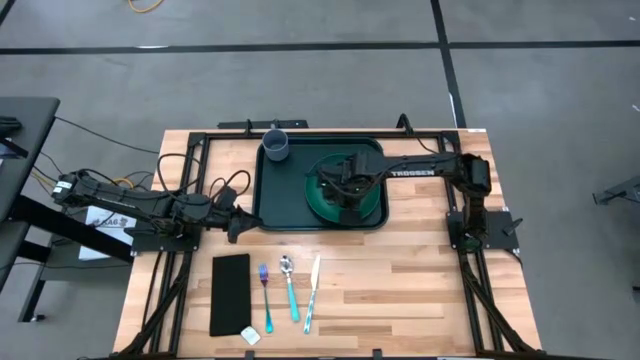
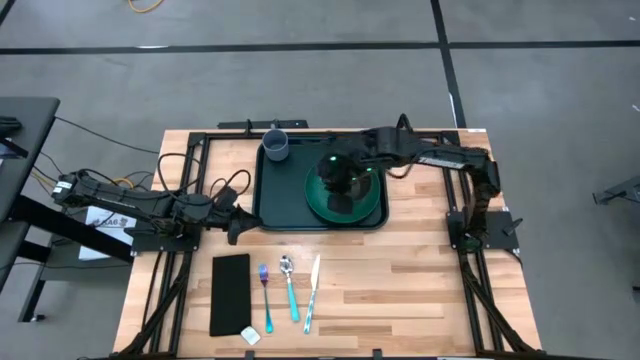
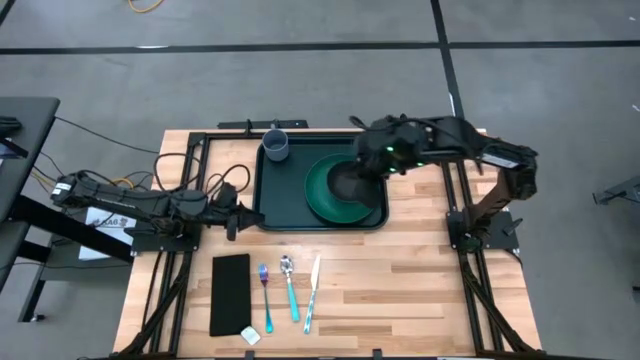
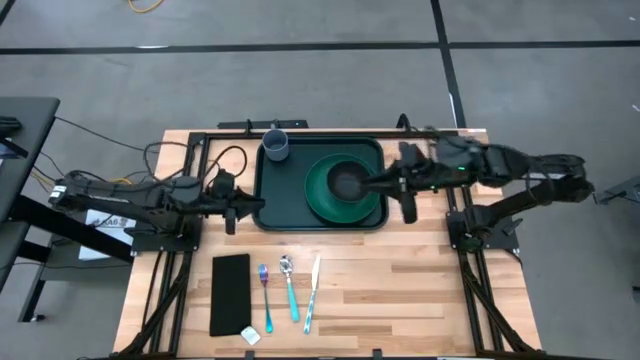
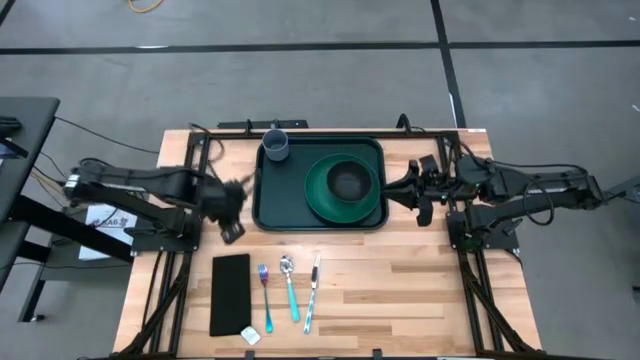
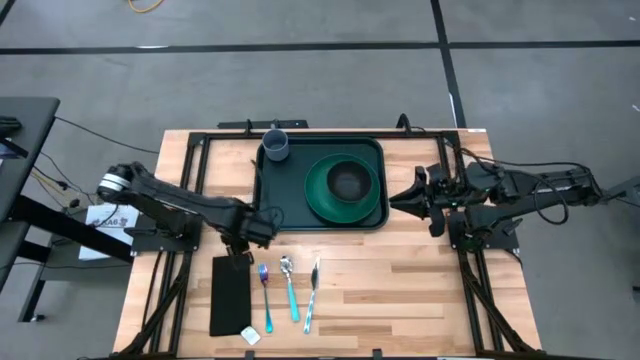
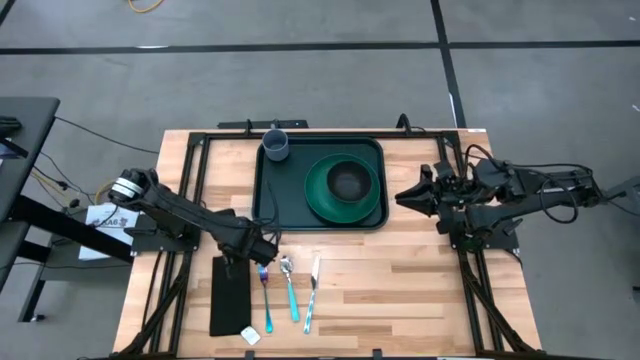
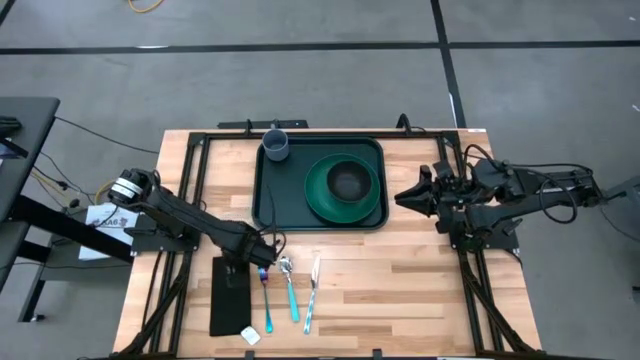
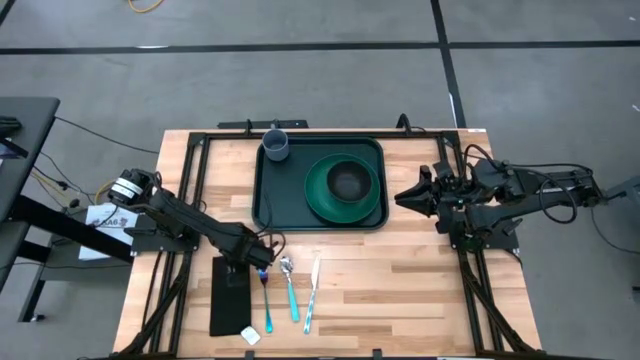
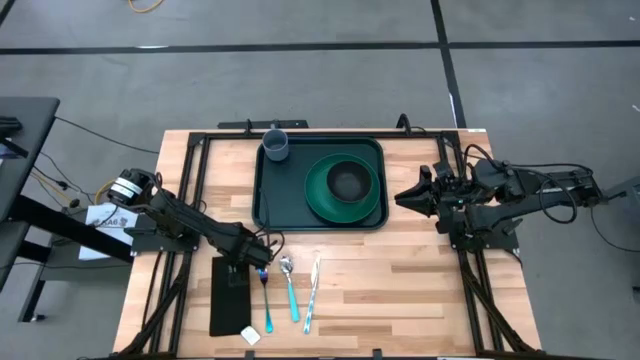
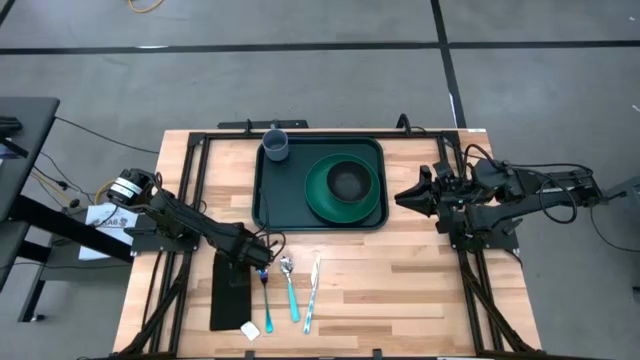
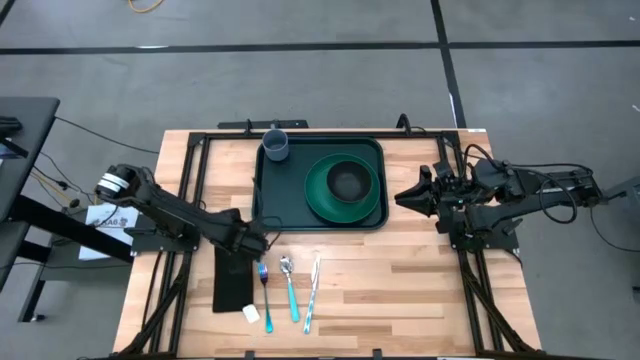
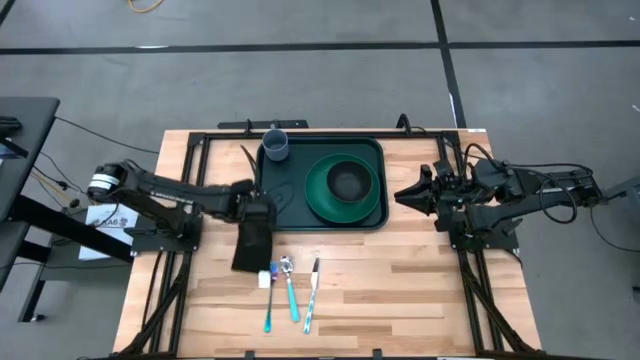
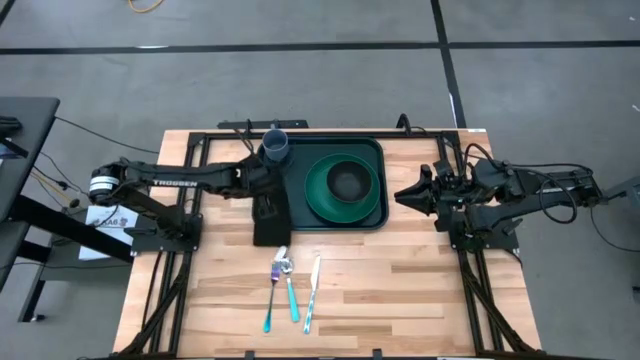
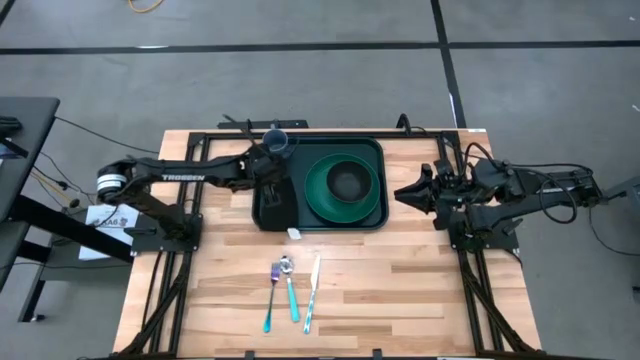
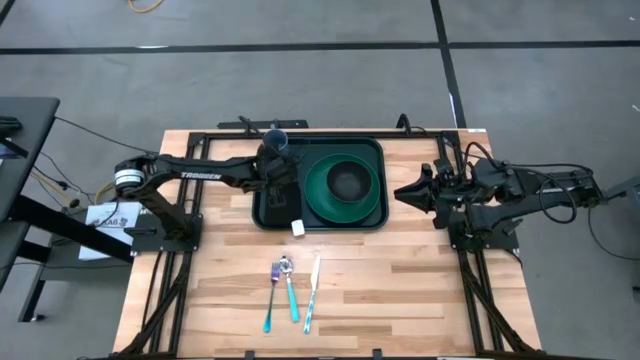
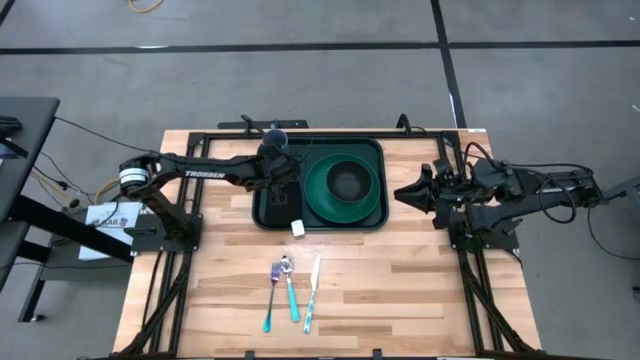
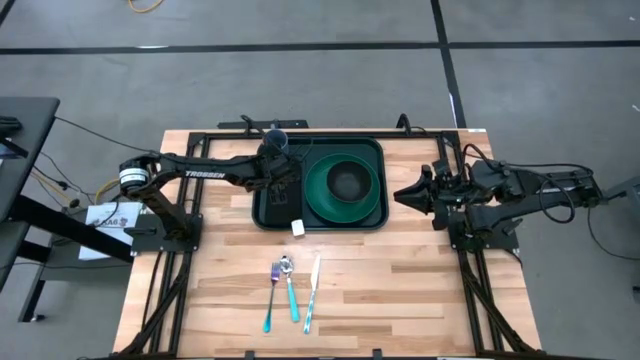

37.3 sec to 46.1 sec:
Task: Set up tray
Put the black napkin to the left of the green plate on the dark green tray

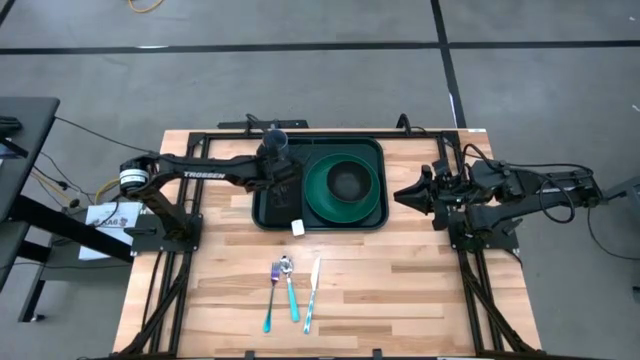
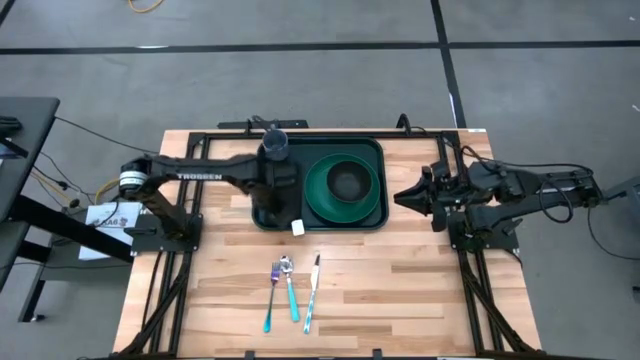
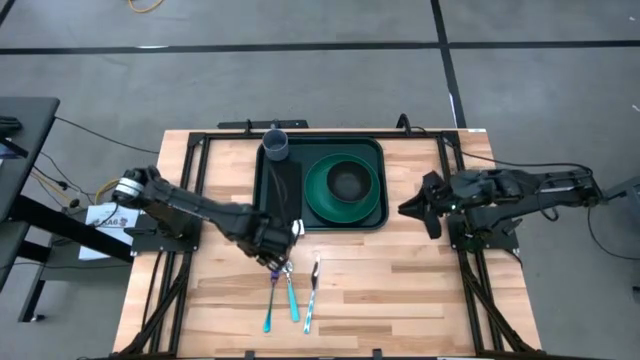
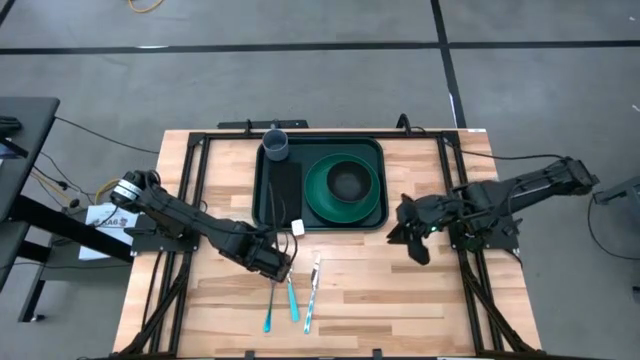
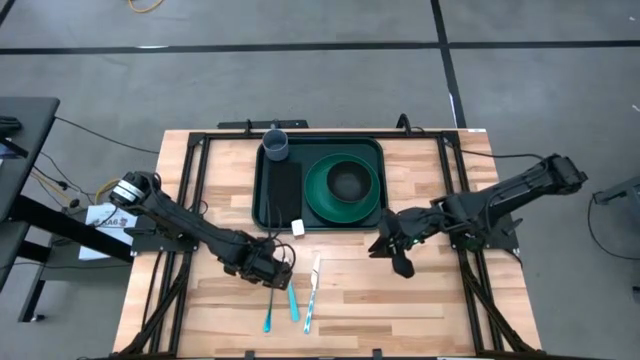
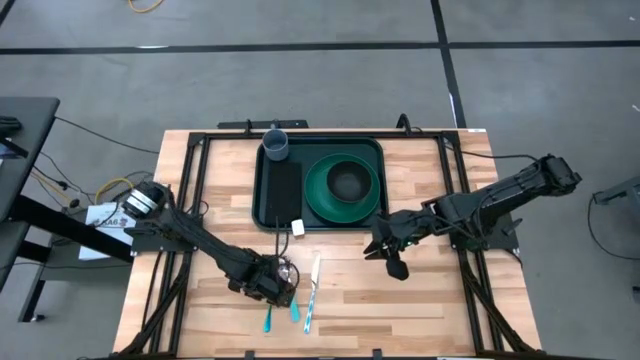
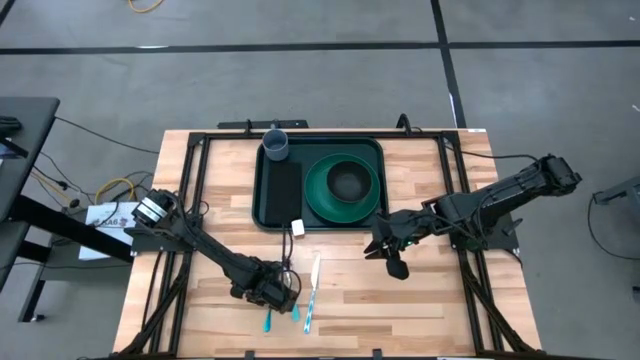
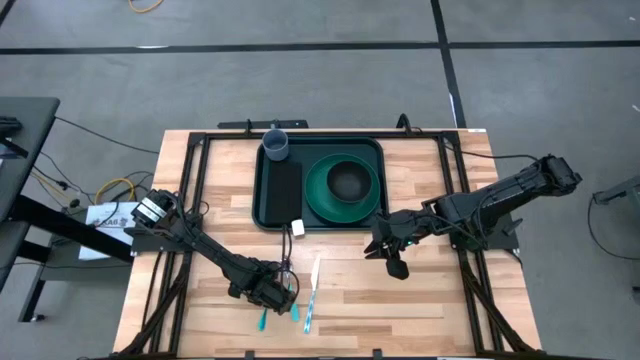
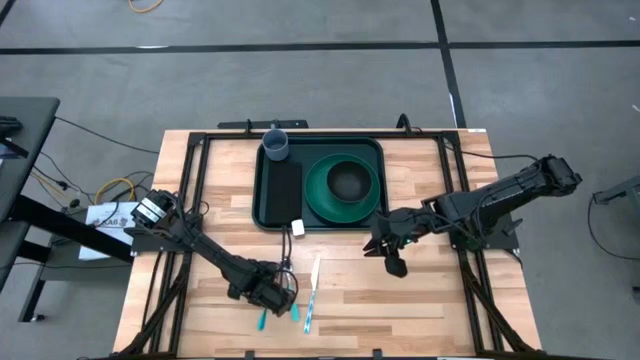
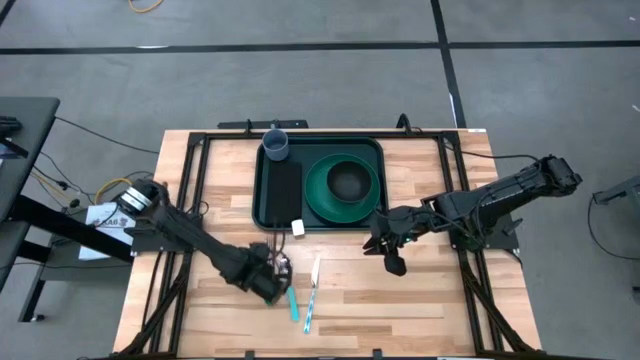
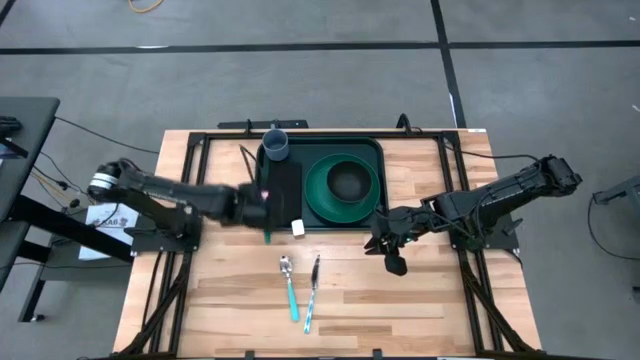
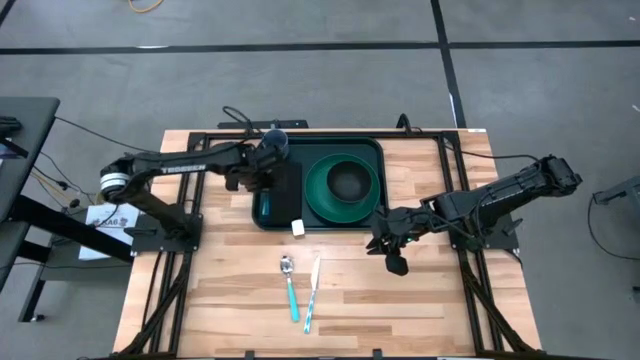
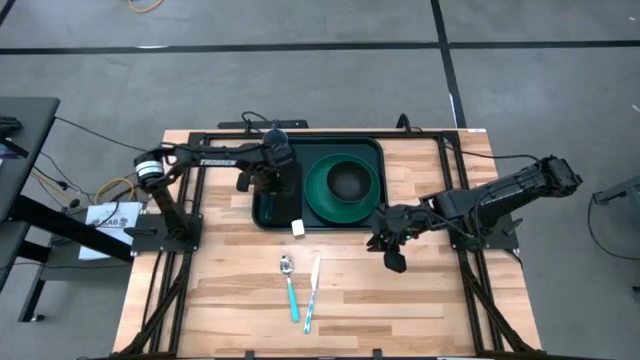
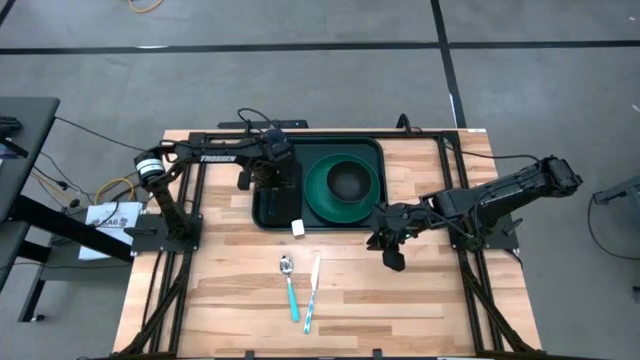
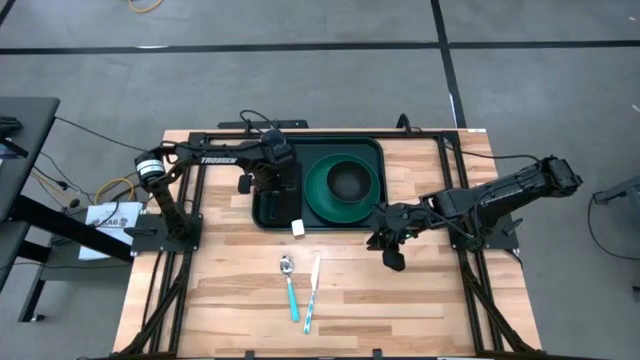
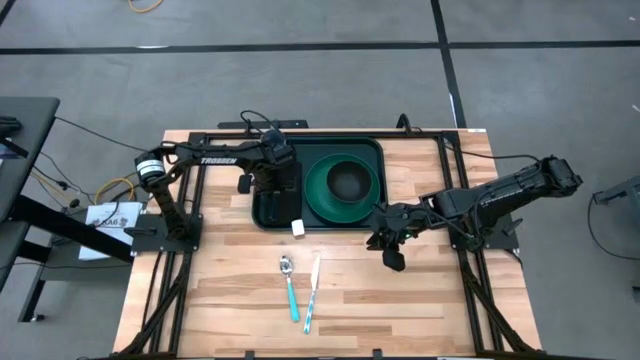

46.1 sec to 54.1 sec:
Put the blue fork on the black napkin on the dark green tray

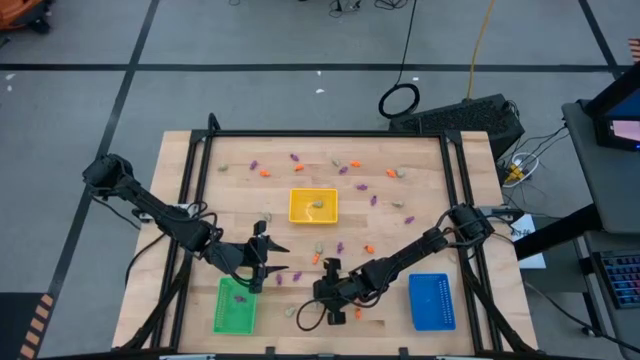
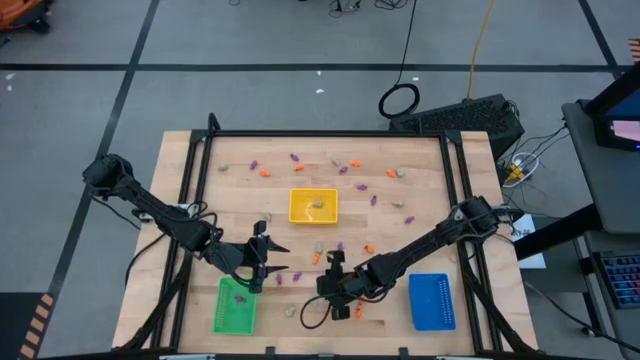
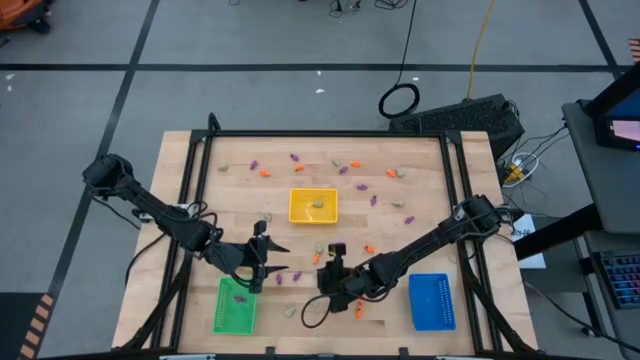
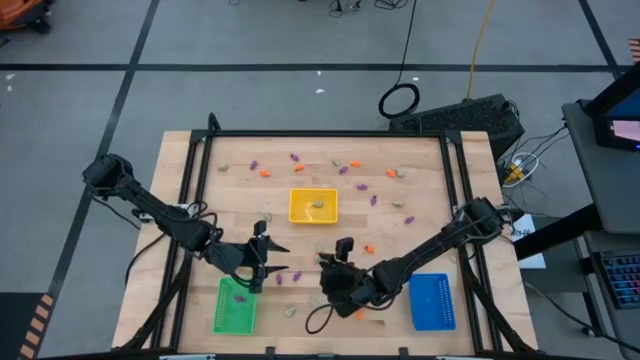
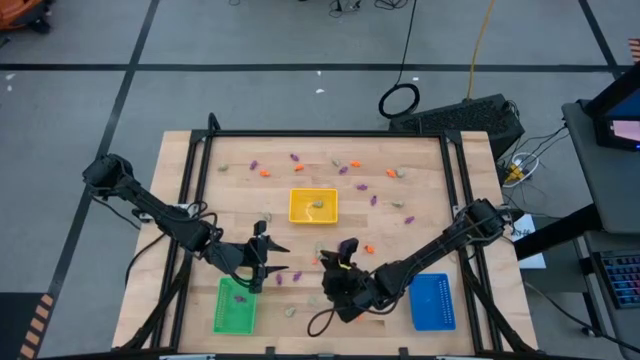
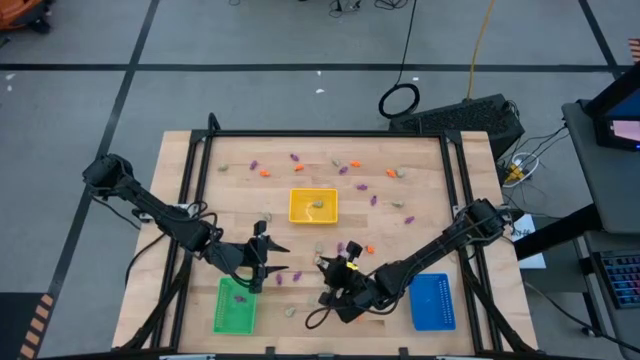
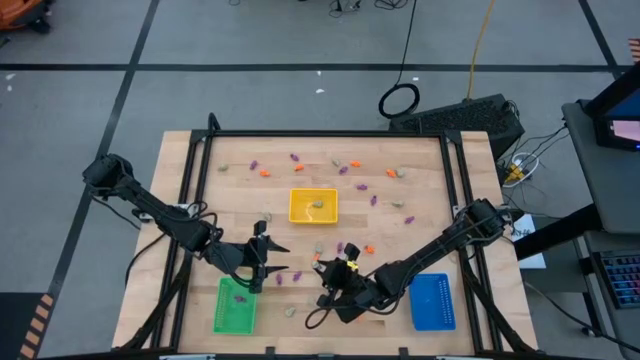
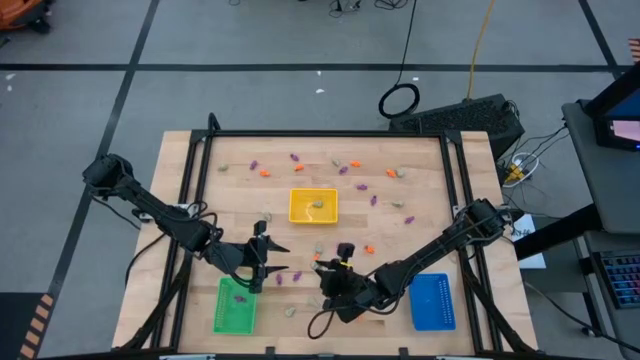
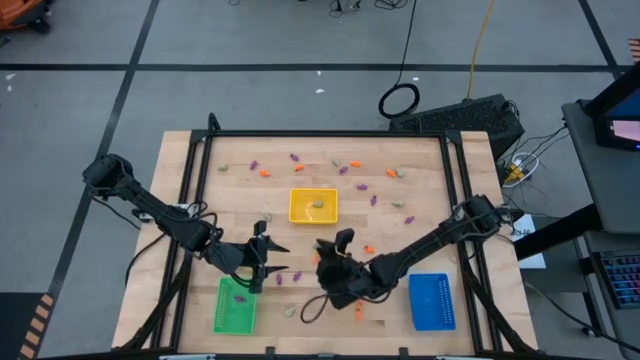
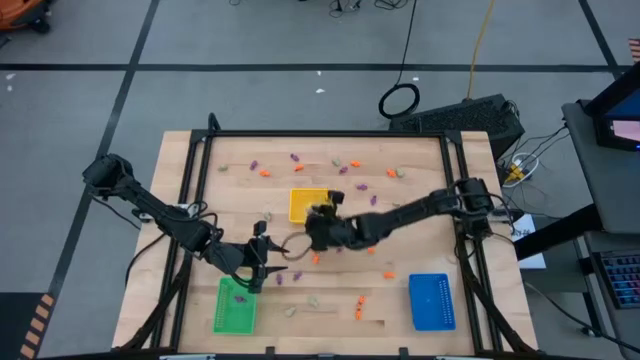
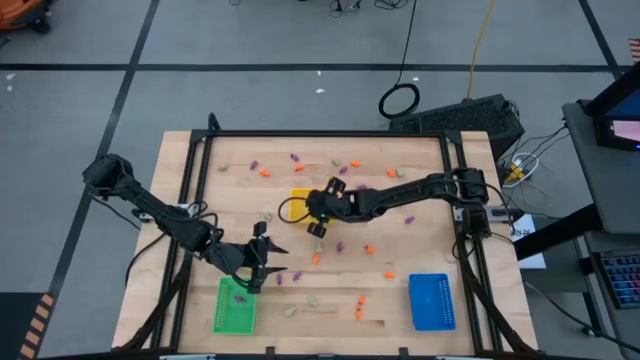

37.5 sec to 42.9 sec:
Task: Sort Halloween decoration
Put the white skull toy in the yellow basket
